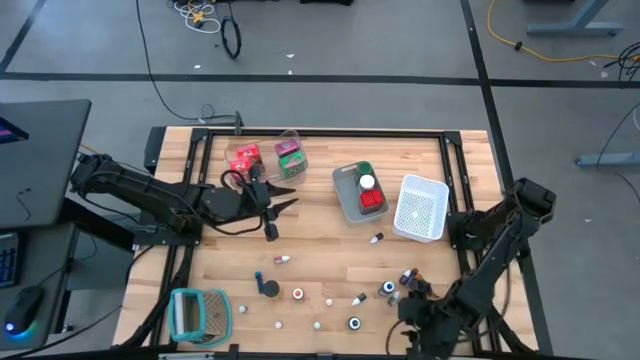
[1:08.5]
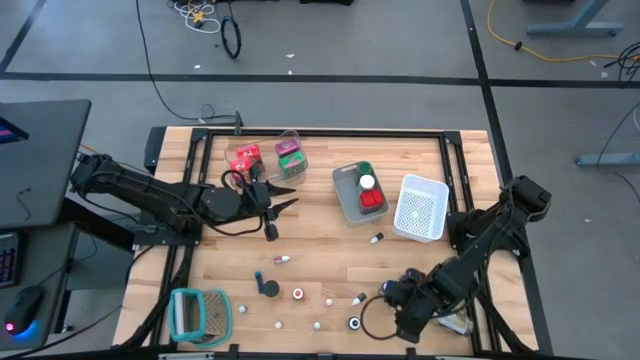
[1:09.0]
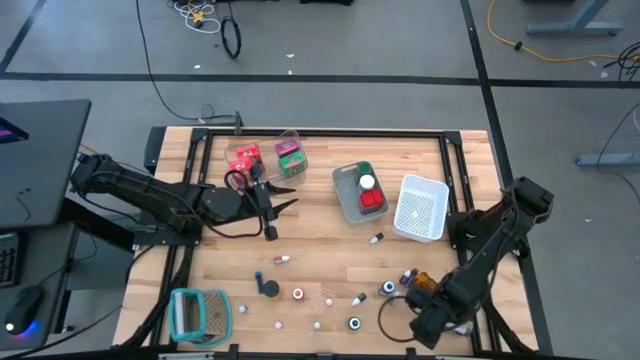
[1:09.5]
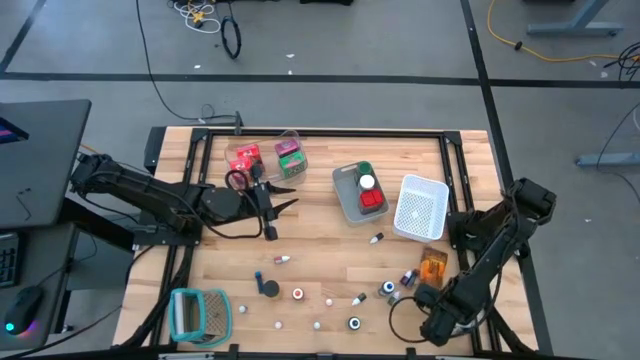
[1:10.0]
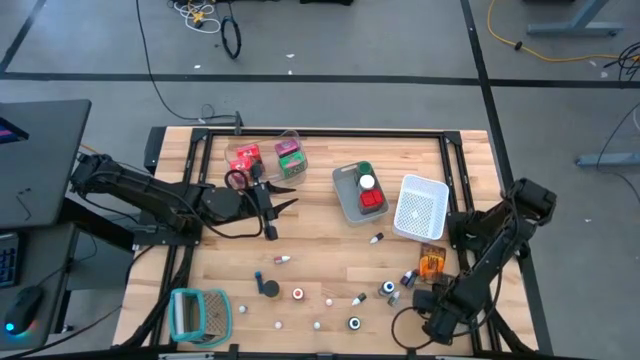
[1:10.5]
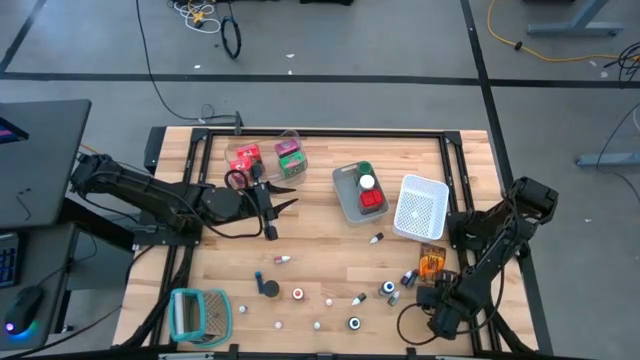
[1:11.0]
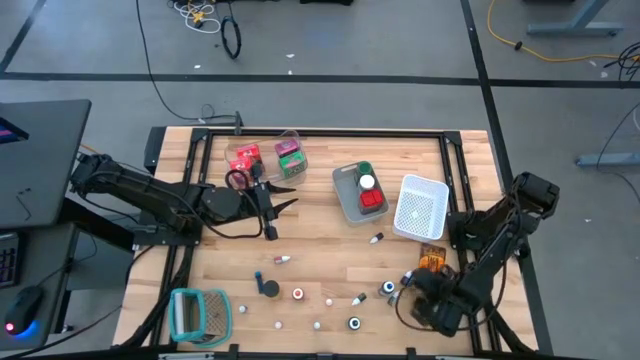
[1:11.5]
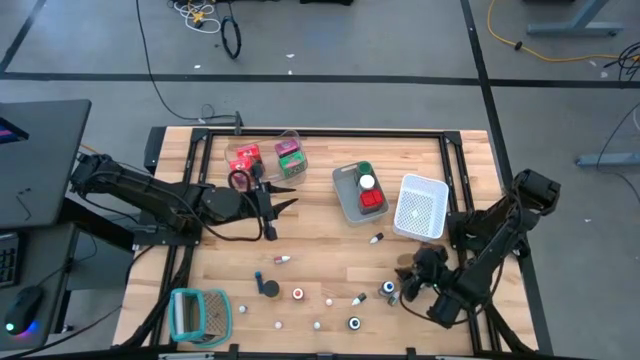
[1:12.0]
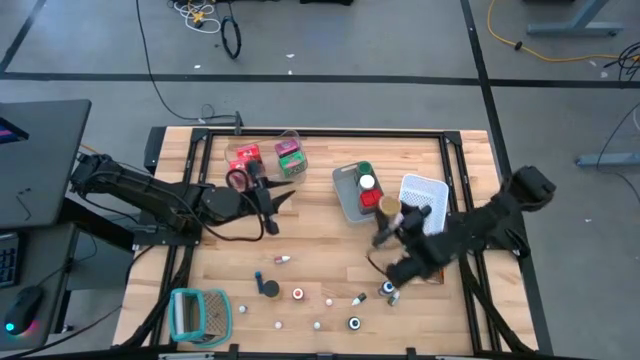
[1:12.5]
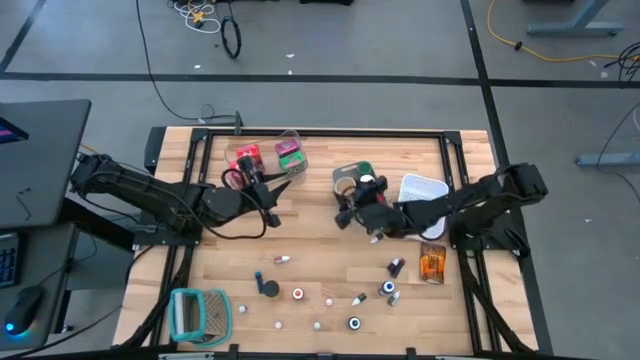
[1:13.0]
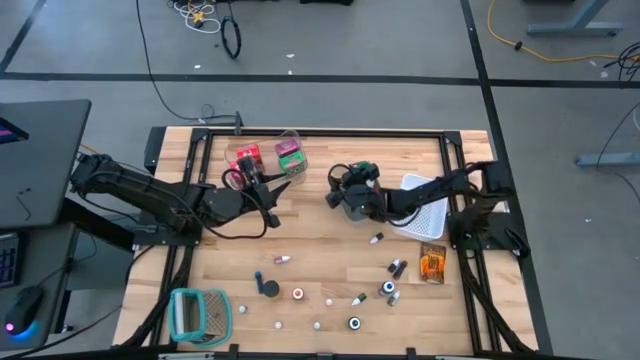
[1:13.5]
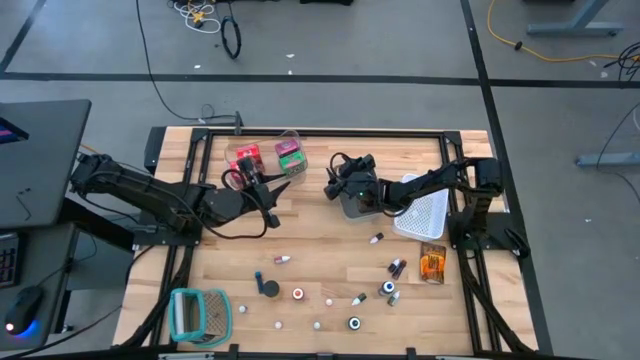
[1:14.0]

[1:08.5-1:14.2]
Task: Pick & Place Kitchen Items
Put the gold spice bottle into the gray bin

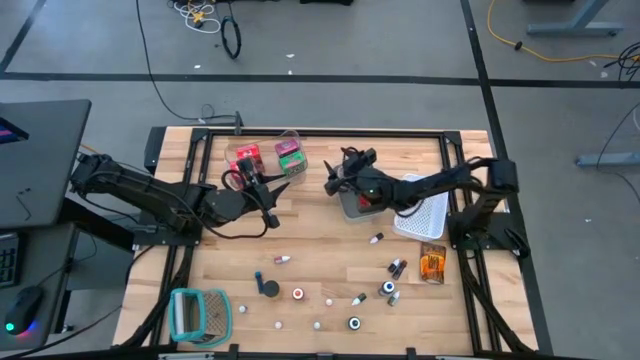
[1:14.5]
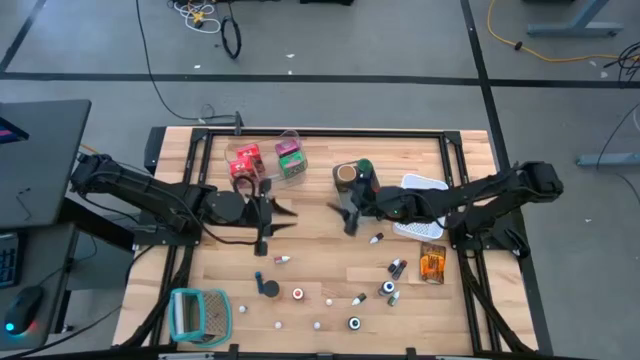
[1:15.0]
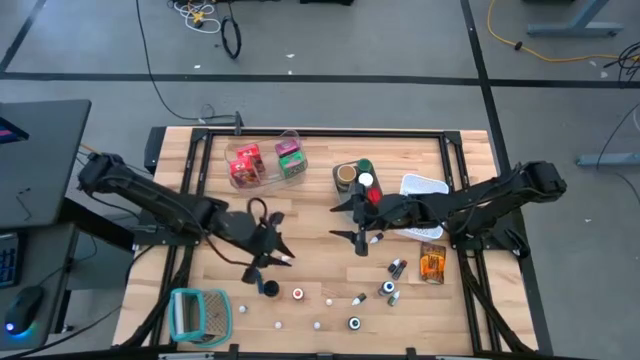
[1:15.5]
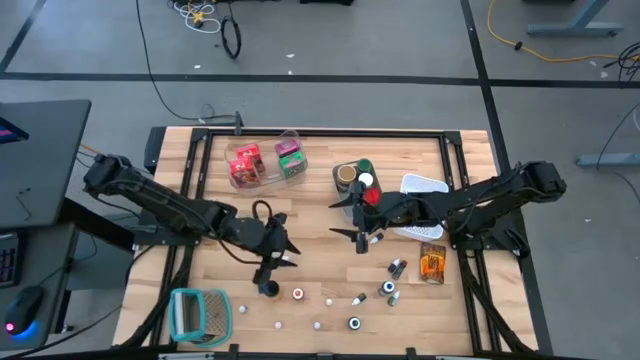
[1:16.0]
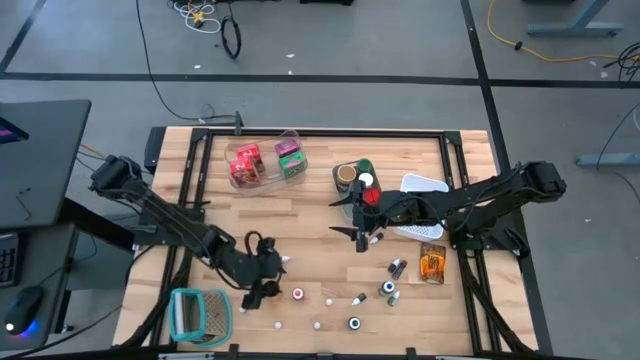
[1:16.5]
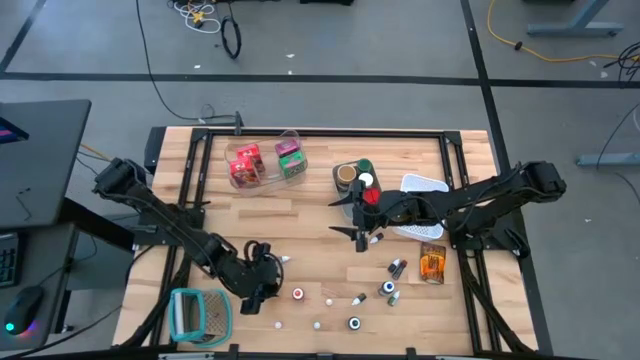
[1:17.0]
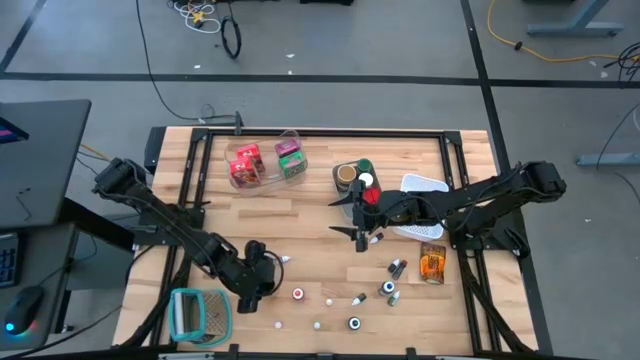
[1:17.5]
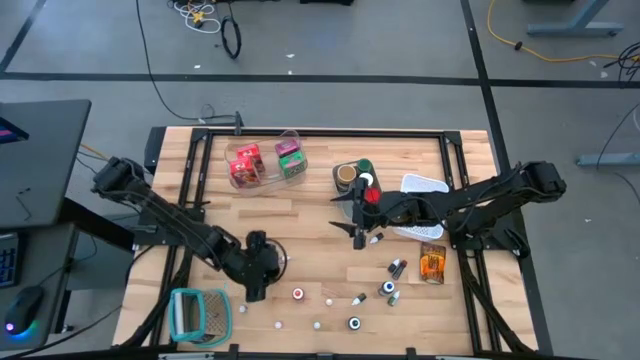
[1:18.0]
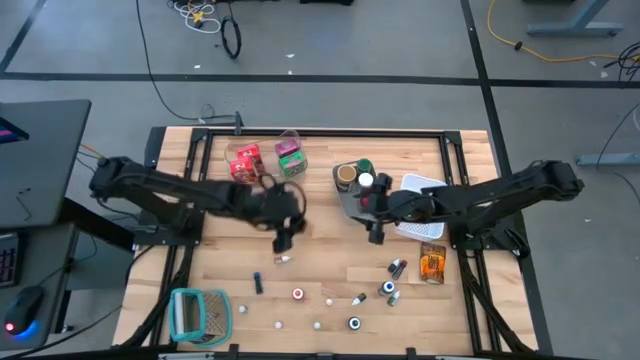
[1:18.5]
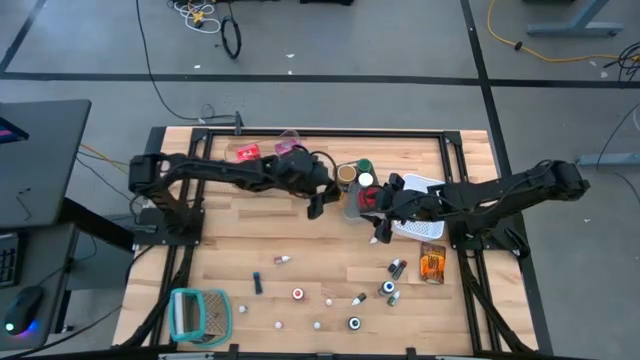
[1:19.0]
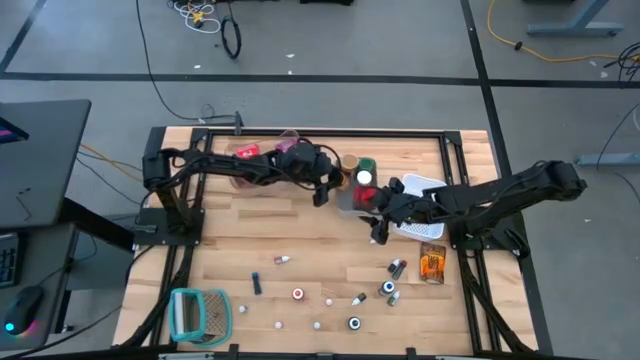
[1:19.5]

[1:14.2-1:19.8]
Put the yellow spice bottle into the gray bin

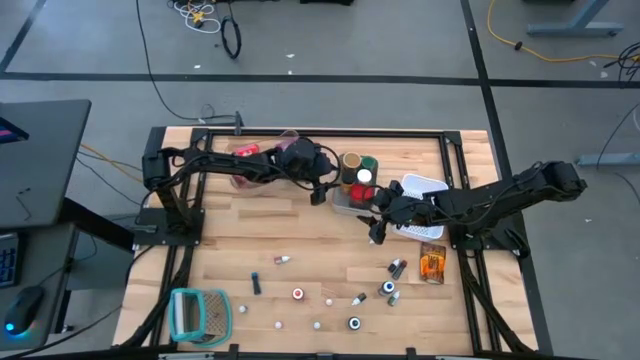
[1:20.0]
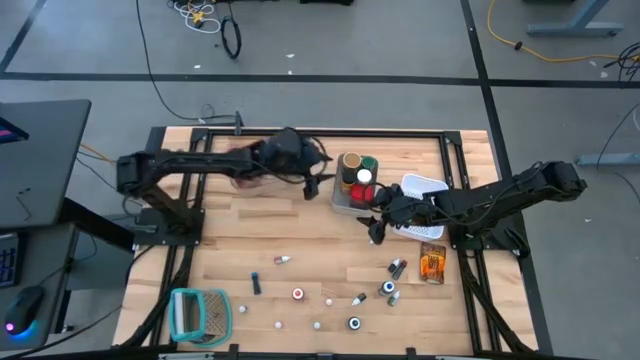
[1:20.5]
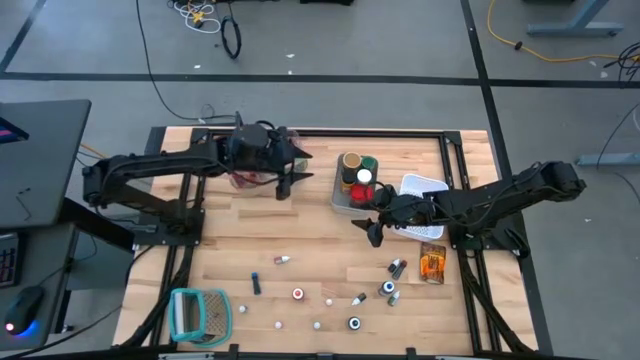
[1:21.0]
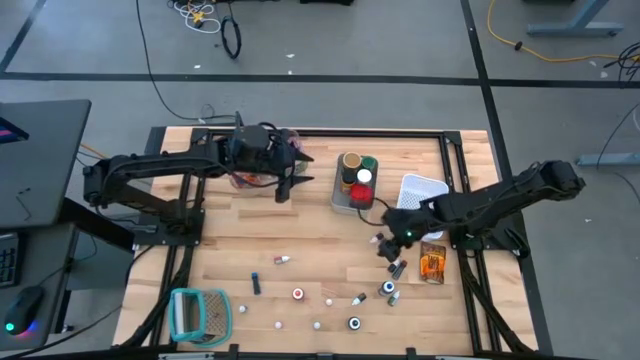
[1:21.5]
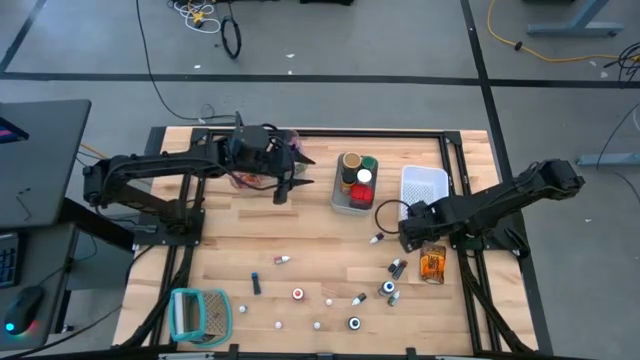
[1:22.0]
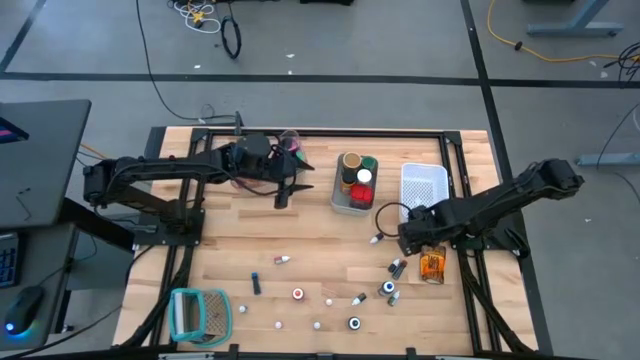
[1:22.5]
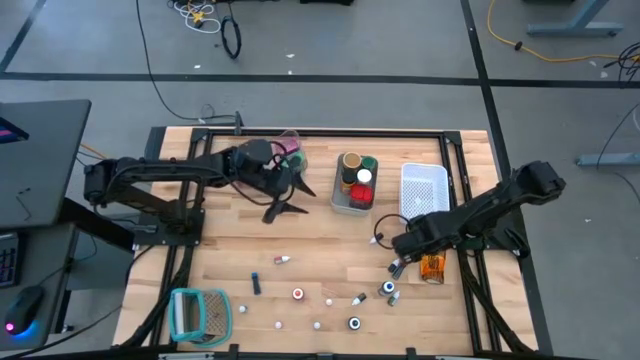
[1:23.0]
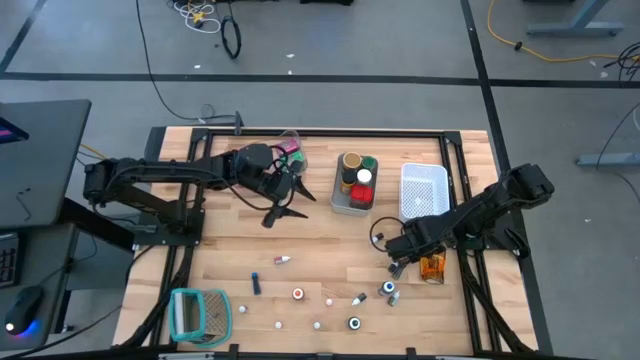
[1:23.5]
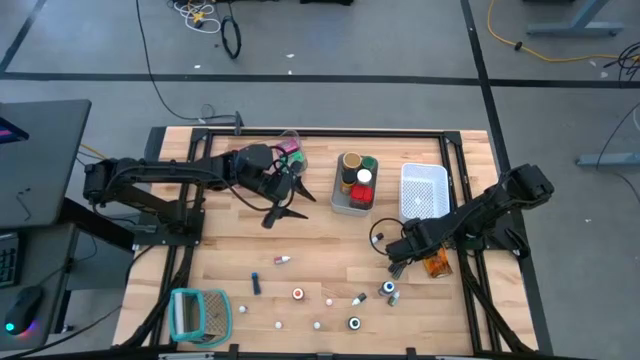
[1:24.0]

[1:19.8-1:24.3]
Put the orange spice bag into the gray bin

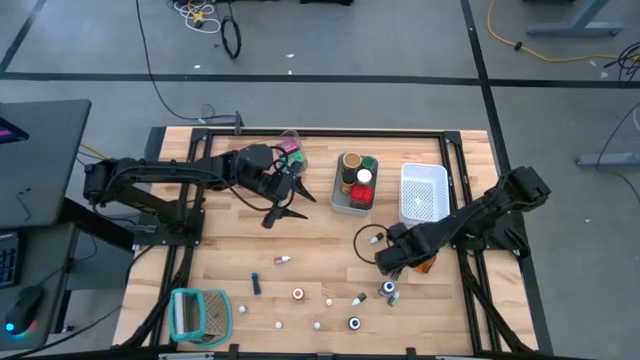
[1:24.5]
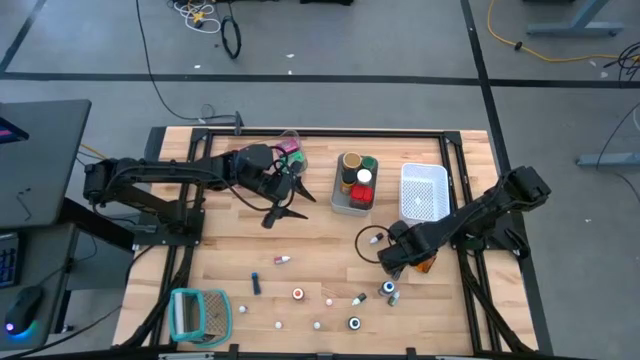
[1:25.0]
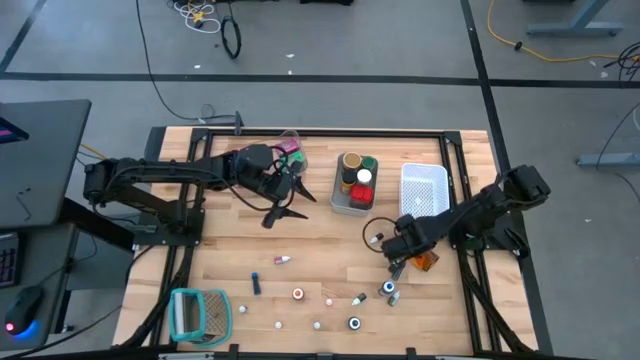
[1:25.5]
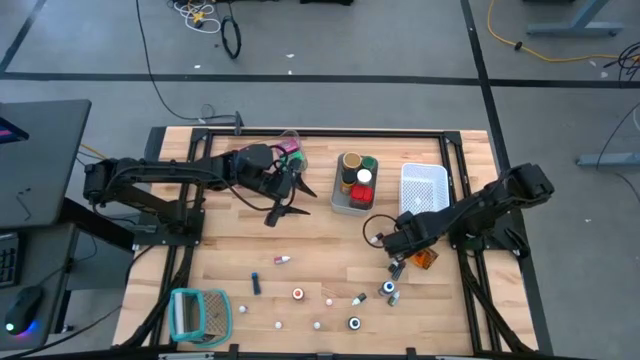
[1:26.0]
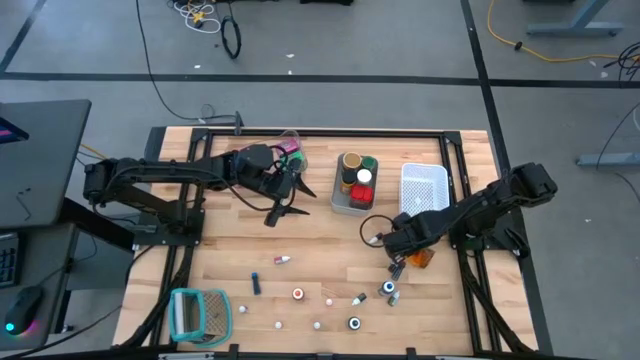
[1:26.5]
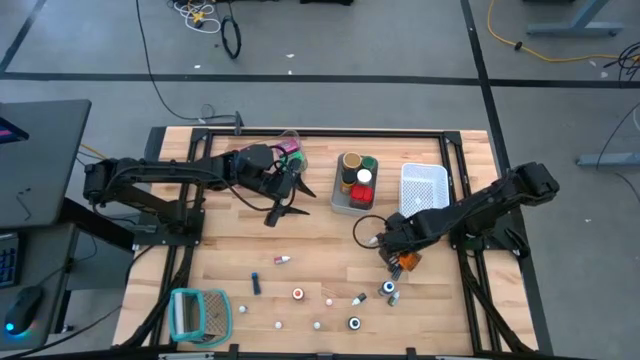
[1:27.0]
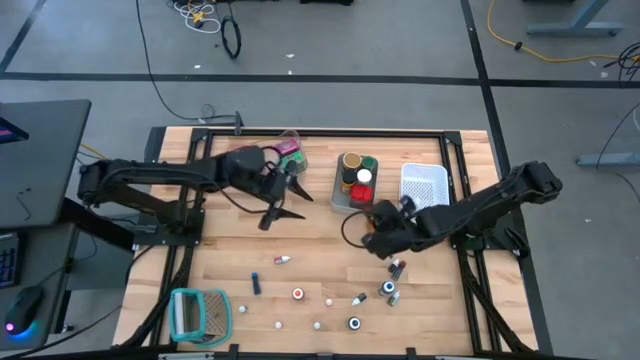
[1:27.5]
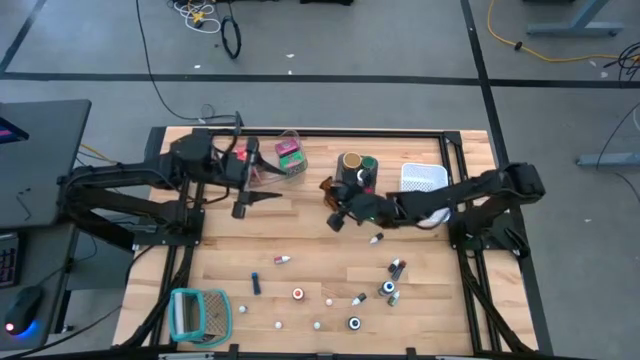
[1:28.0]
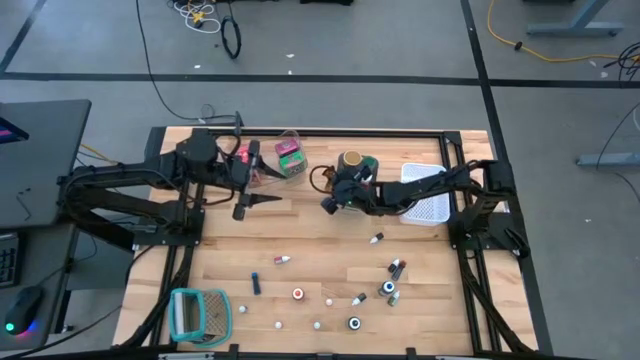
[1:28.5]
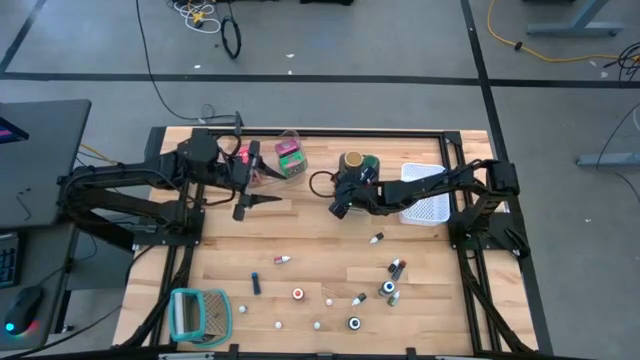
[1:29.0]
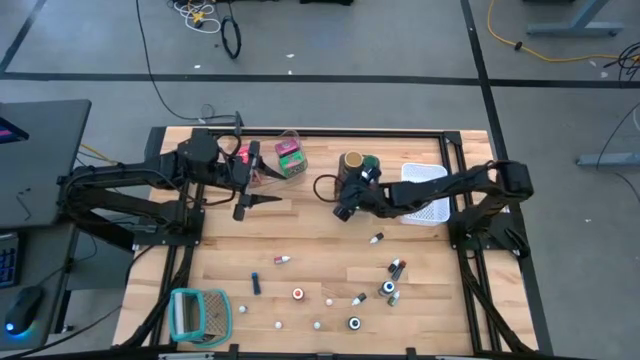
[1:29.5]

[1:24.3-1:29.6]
Put the orange spice bag into the gray bin
